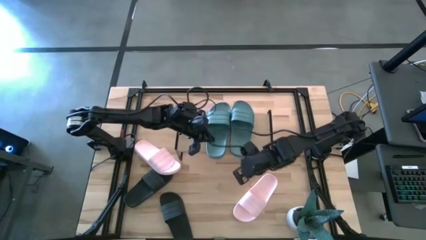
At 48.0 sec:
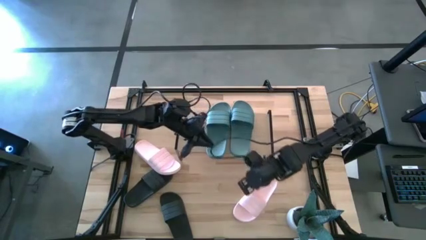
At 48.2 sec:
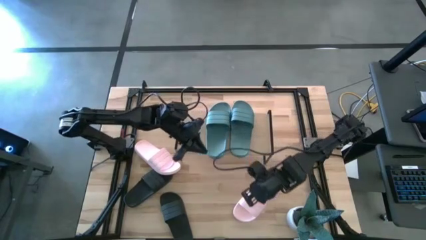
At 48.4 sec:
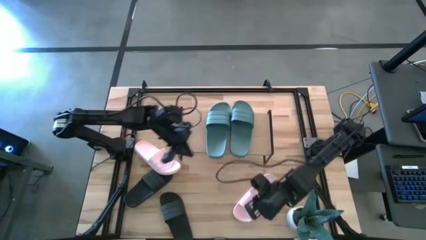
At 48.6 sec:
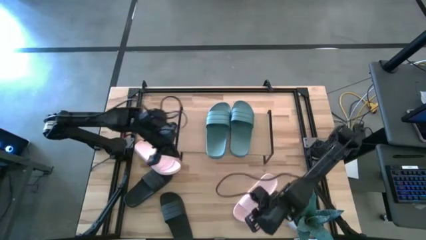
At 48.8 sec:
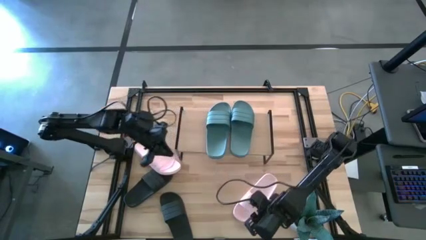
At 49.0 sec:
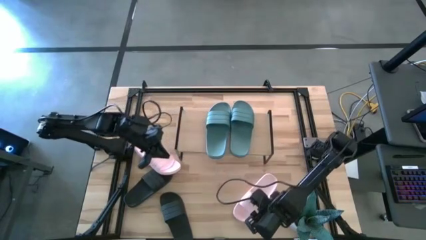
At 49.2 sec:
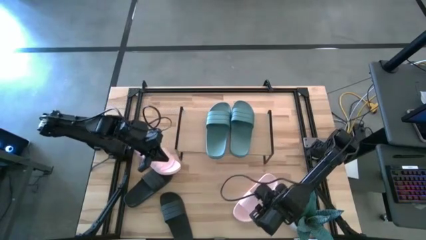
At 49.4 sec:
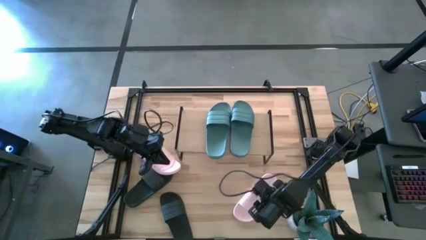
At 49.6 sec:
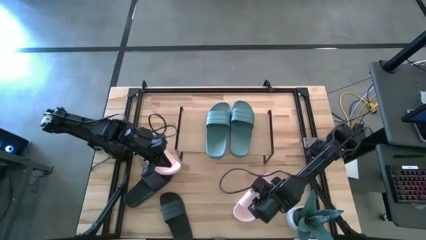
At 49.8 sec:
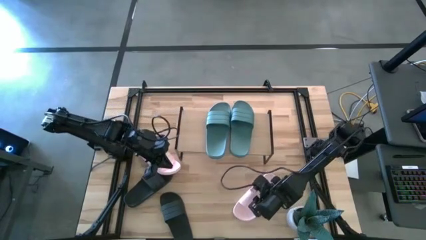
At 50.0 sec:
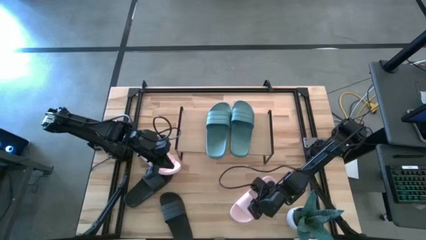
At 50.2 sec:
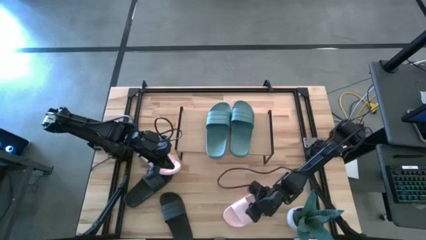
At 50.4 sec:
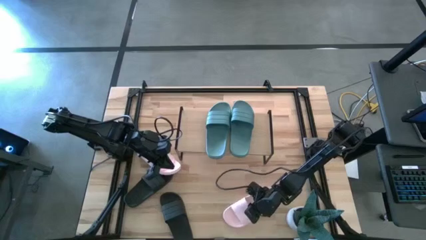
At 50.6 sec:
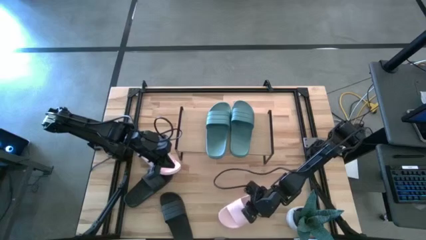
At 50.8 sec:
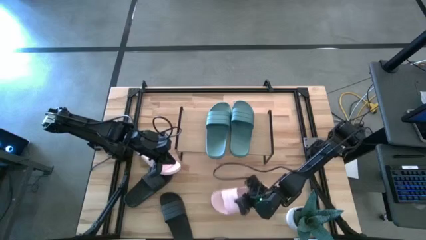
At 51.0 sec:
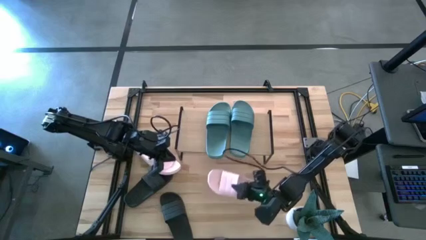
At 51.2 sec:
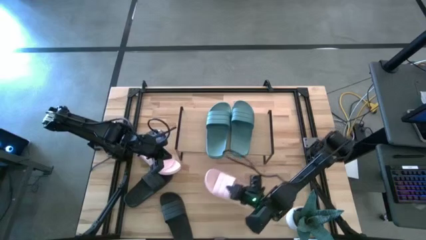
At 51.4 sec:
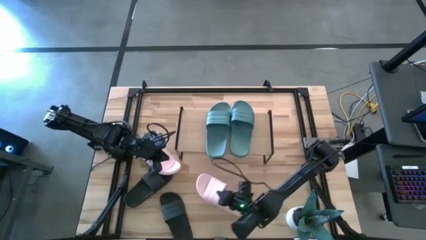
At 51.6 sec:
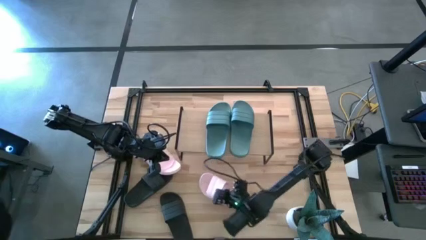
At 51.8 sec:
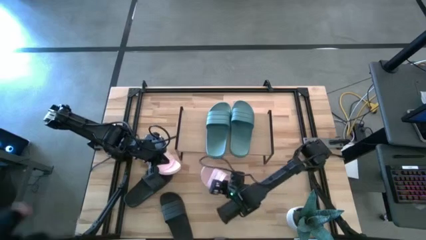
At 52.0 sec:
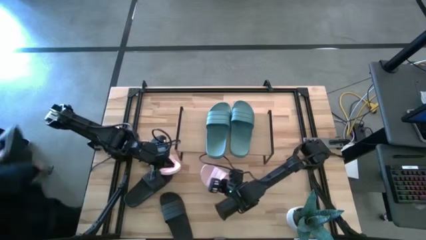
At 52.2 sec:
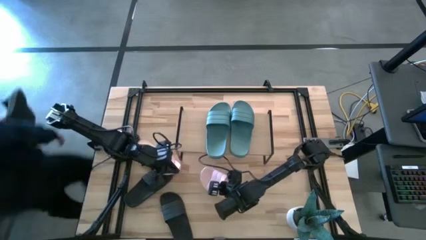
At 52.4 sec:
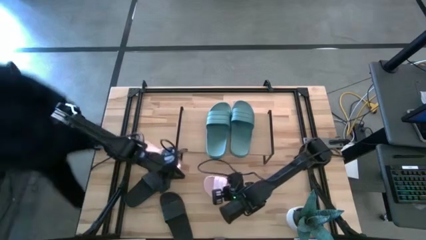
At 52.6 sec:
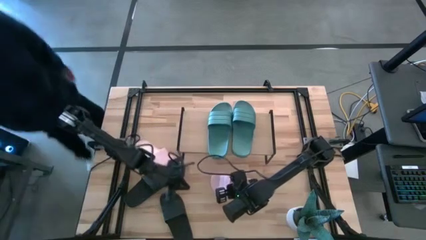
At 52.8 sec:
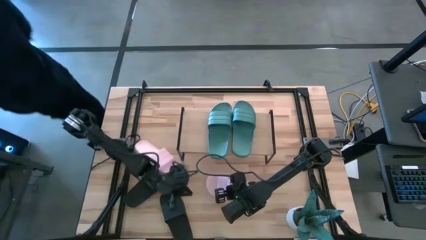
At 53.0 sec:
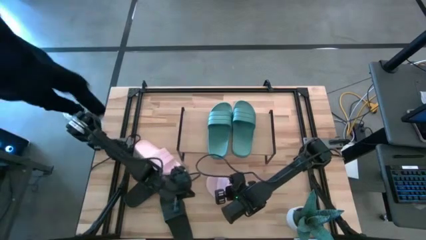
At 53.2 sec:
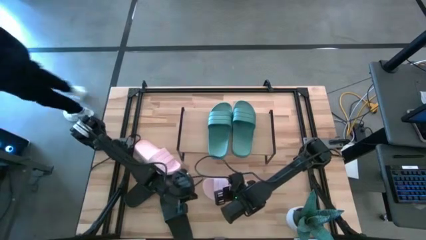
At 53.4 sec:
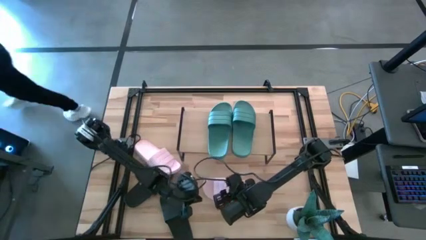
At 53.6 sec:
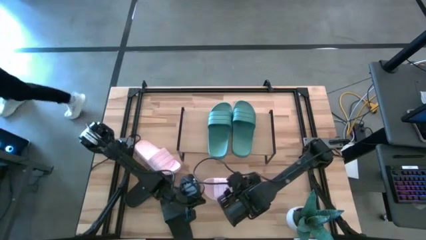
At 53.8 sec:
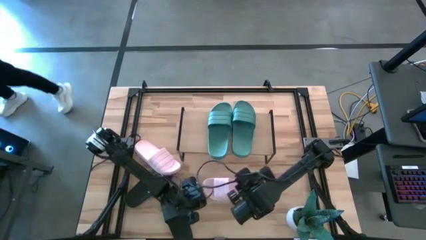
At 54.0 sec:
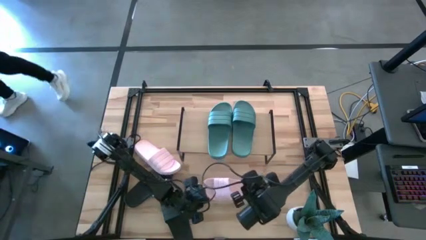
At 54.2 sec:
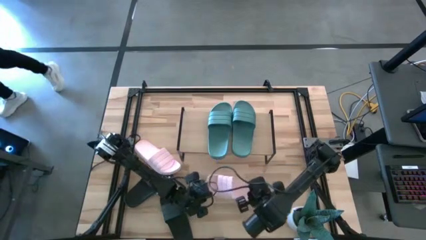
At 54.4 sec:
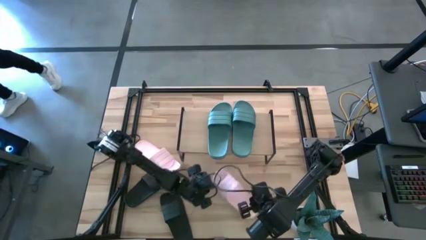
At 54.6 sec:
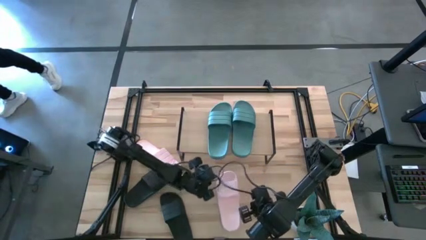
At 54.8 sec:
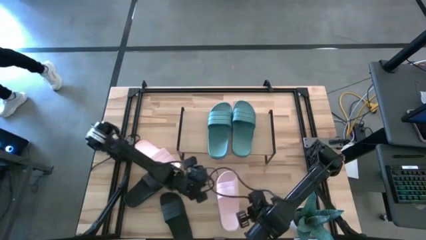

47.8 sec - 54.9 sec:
Task: Pick and place slides into the shelf
Adjust the right pink slipper

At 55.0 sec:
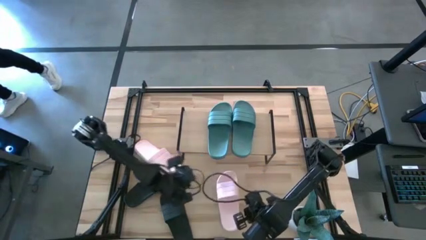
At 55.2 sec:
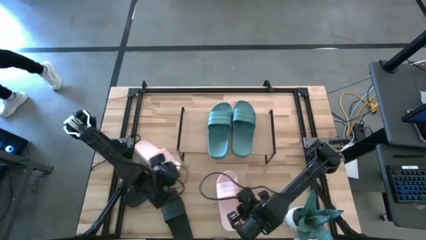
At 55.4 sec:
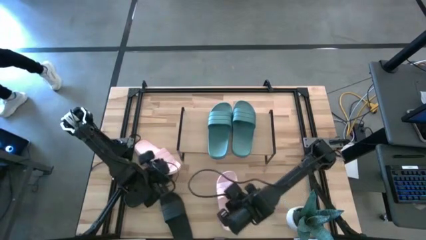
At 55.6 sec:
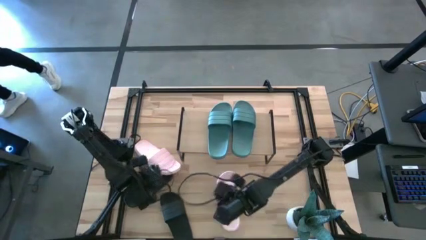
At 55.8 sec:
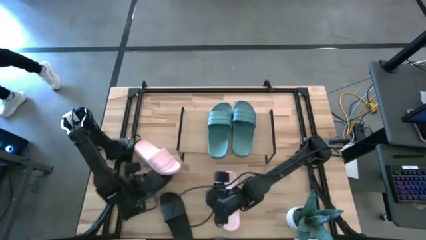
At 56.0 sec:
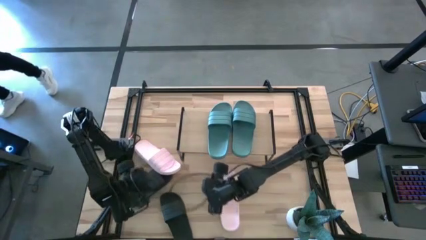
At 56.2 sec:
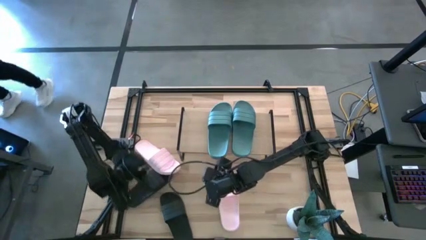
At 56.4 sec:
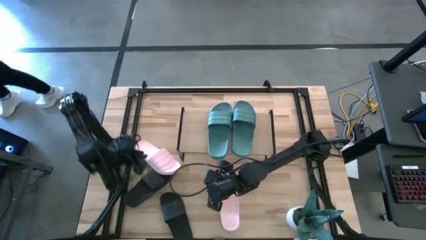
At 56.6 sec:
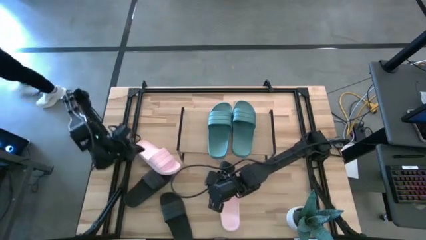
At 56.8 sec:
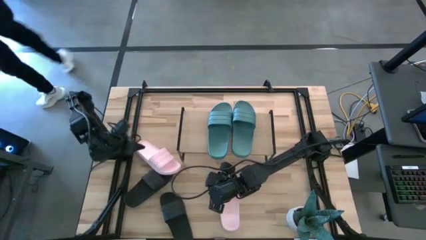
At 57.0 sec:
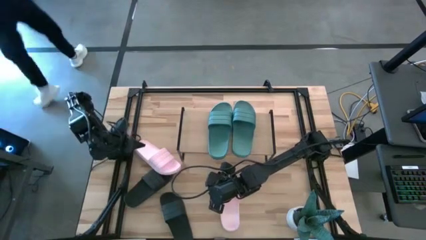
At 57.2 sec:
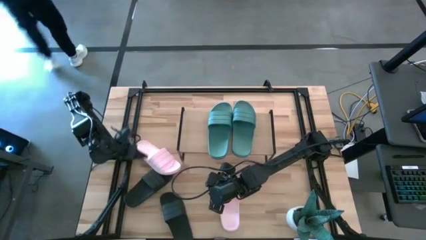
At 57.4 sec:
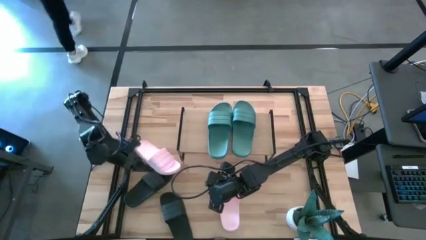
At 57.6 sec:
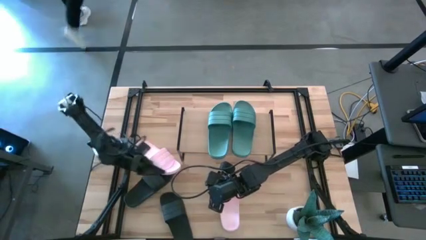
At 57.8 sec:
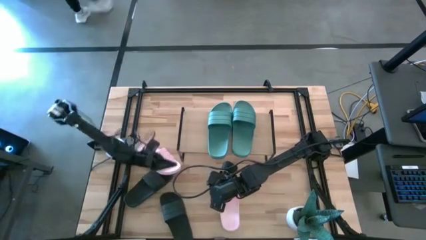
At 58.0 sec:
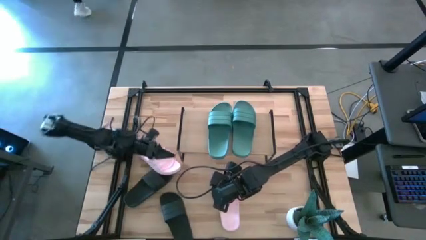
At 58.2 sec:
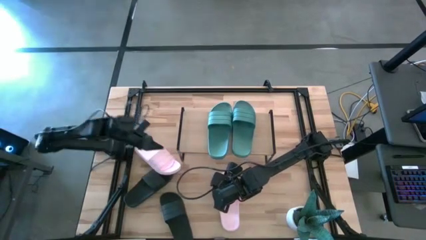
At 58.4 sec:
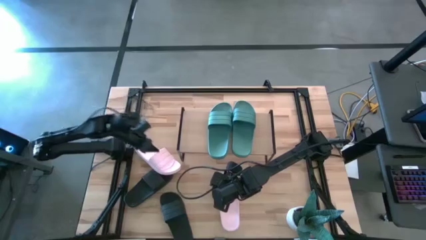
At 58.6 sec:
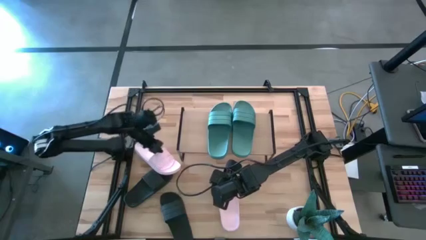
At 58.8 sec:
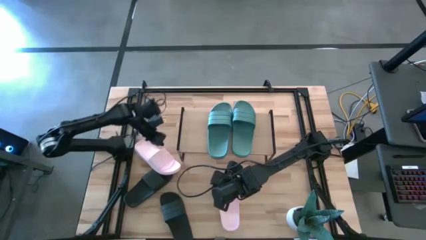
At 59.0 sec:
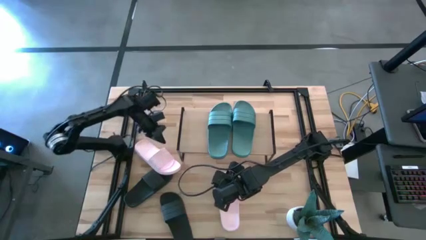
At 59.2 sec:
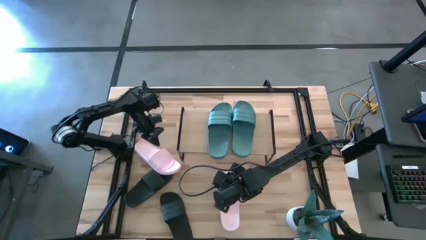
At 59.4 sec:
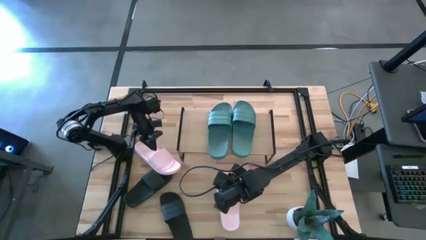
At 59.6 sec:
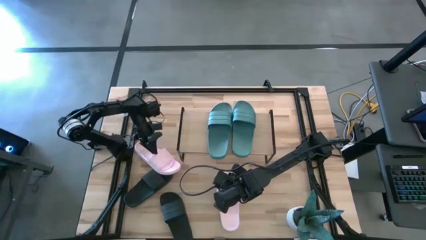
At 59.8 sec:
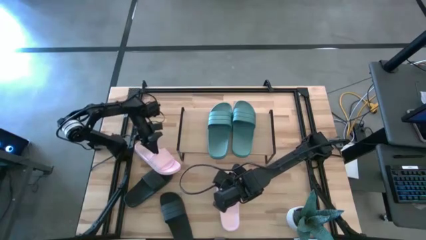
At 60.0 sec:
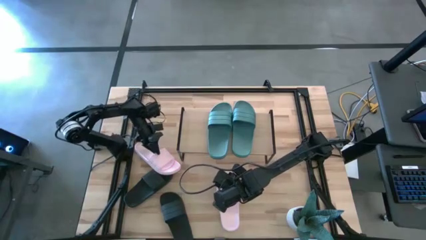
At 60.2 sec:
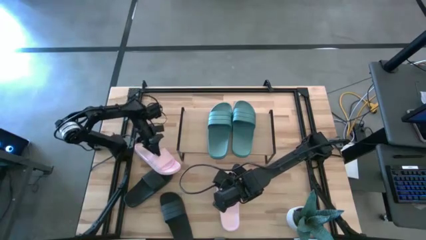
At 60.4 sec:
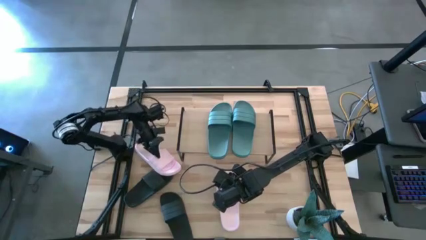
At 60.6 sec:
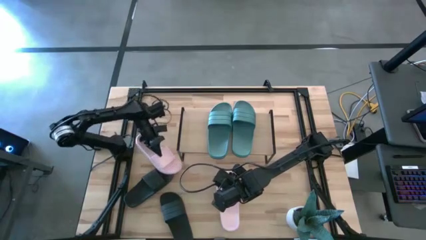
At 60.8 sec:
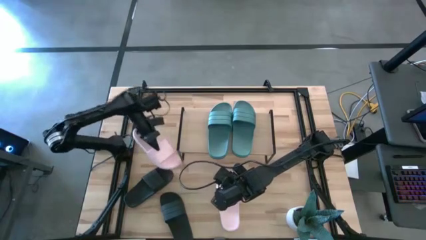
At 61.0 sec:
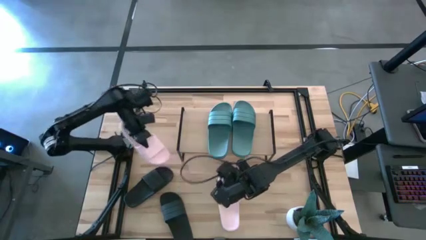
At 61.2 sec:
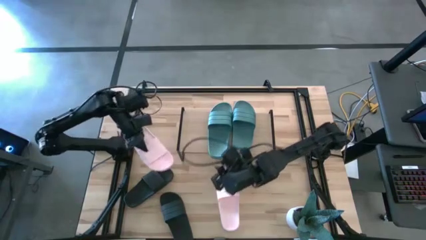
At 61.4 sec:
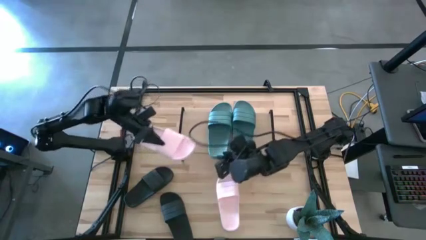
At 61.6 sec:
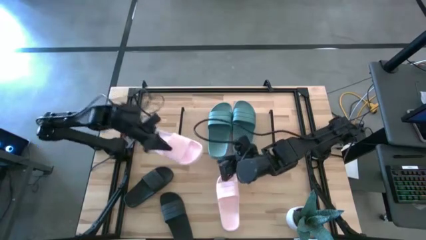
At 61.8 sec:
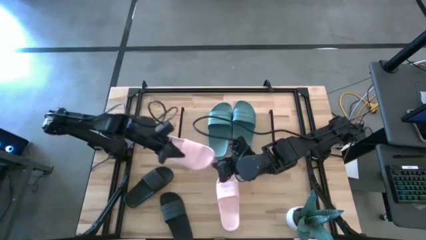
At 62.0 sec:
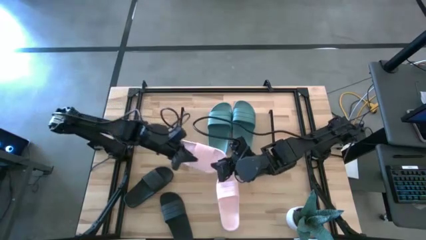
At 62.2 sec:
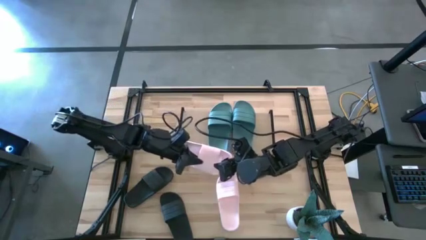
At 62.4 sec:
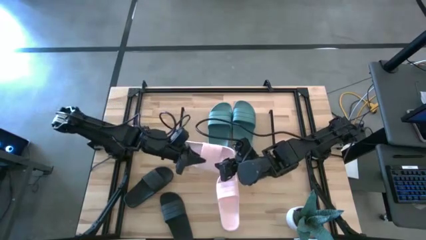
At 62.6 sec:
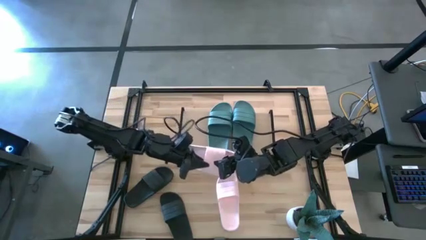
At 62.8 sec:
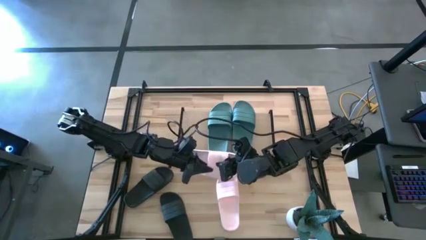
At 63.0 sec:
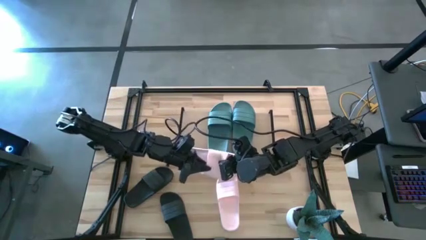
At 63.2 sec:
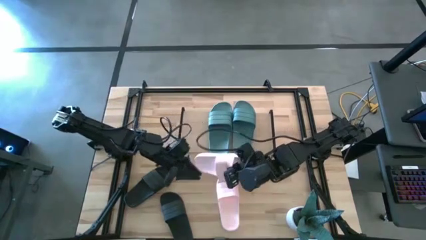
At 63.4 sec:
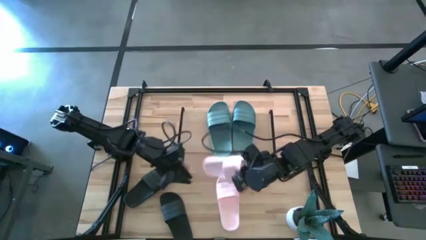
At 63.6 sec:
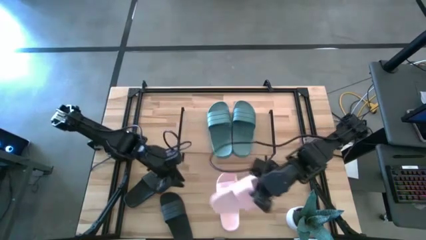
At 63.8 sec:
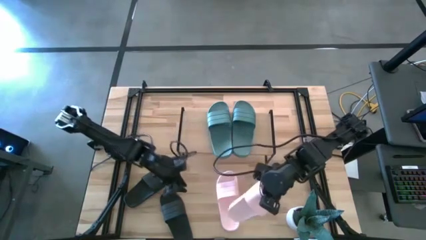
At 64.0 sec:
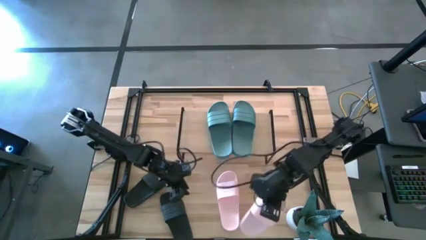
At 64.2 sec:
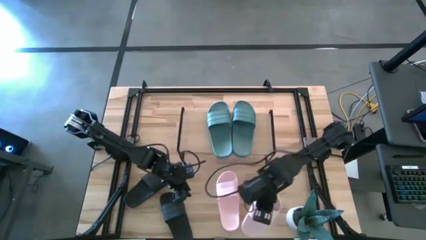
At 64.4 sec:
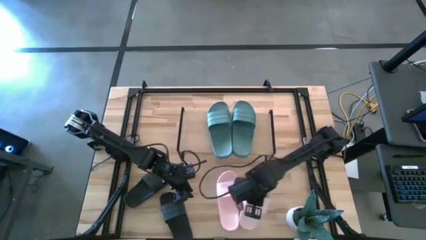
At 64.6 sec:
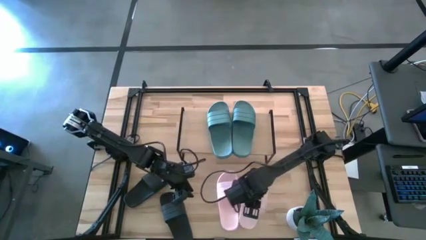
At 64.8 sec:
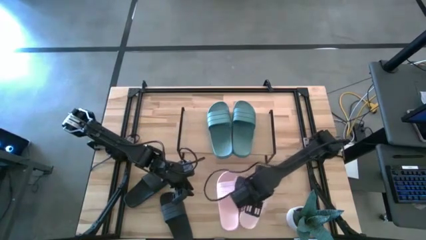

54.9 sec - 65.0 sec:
Move the top pink slipper to the right of the bottom pink slipper

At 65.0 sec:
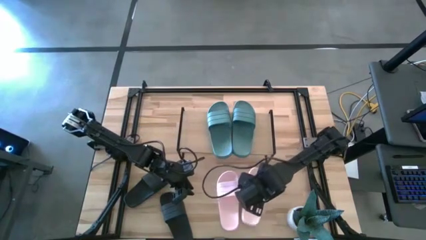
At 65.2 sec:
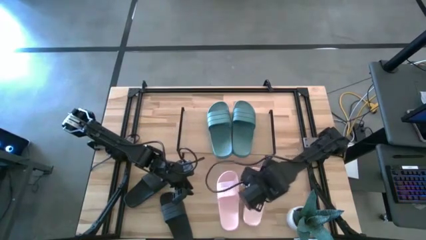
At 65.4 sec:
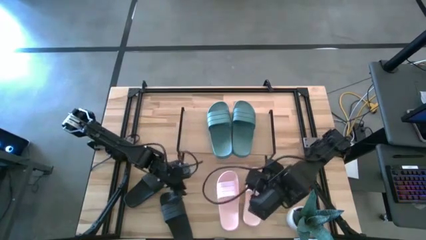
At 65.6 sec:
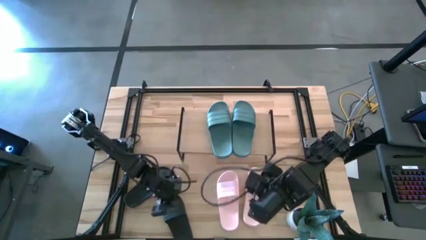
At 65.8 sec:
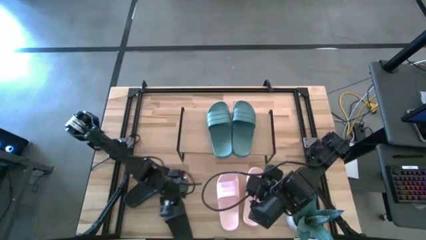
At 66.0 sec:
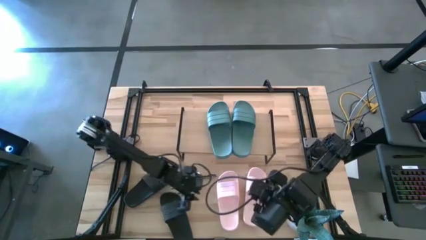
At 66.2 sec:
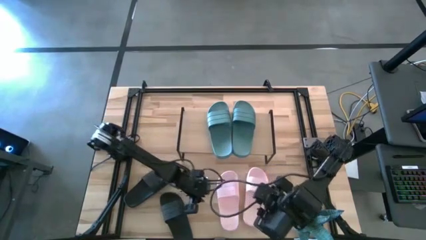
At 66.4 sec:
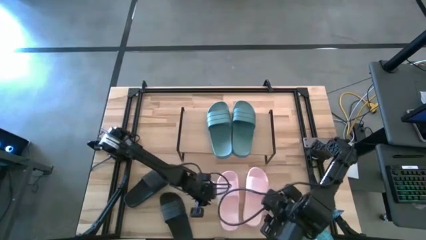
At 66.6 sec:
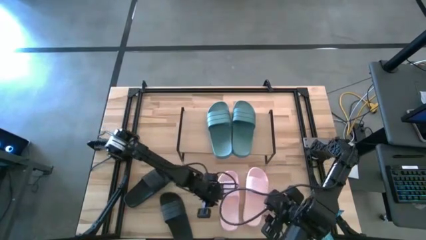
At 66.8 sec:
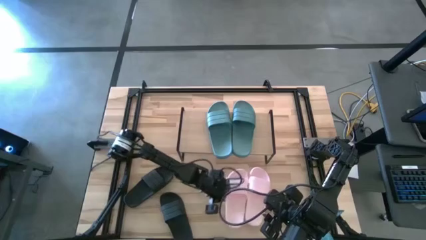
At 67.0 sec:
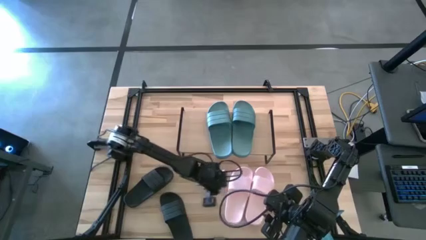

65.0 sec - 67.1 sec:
Adjust the left pink slipper
